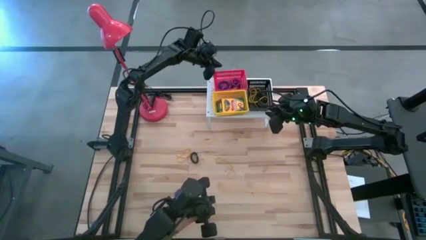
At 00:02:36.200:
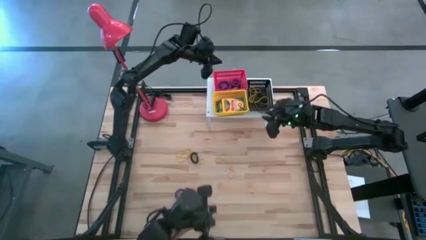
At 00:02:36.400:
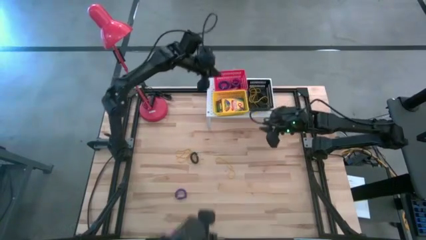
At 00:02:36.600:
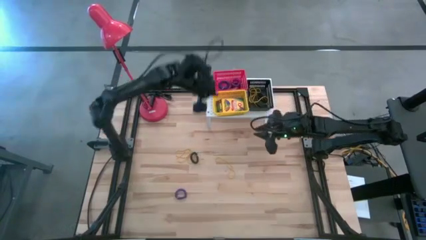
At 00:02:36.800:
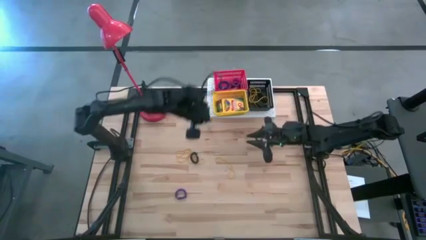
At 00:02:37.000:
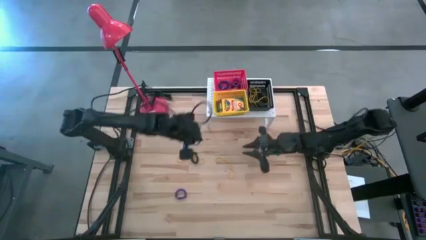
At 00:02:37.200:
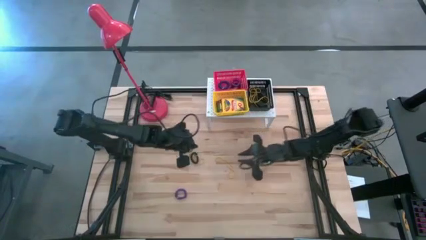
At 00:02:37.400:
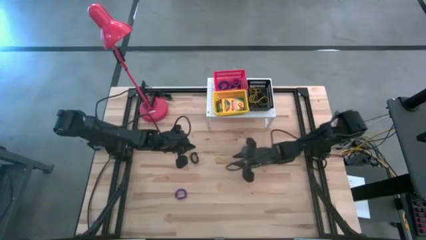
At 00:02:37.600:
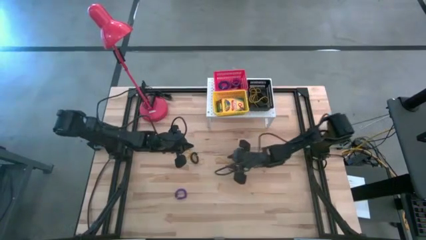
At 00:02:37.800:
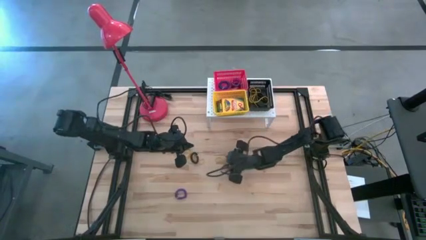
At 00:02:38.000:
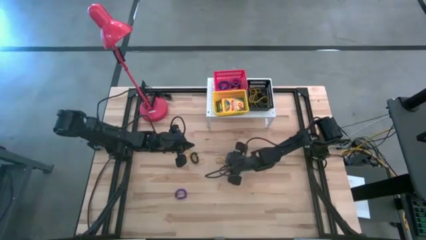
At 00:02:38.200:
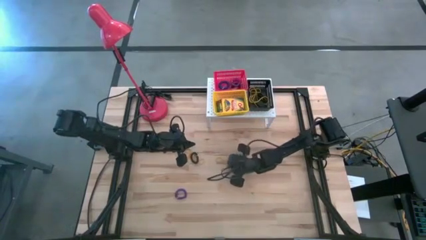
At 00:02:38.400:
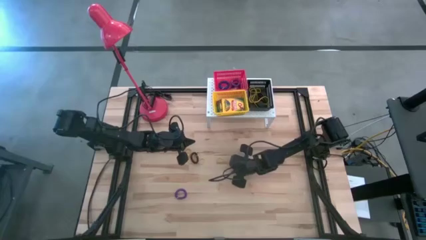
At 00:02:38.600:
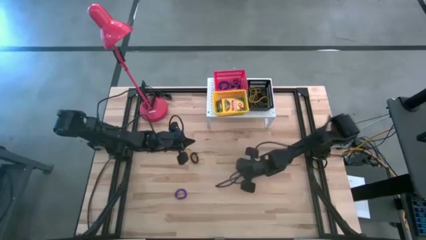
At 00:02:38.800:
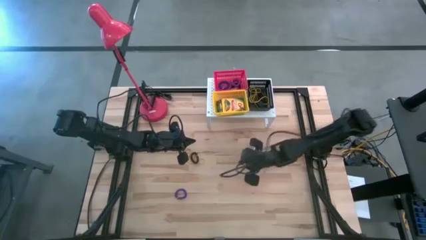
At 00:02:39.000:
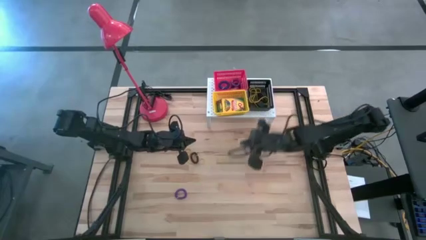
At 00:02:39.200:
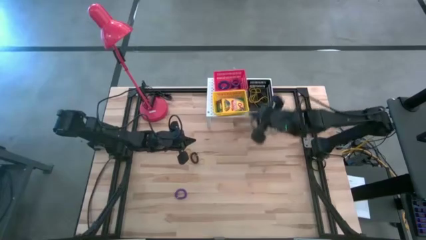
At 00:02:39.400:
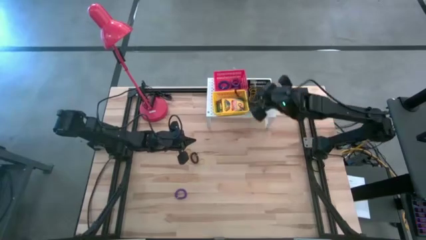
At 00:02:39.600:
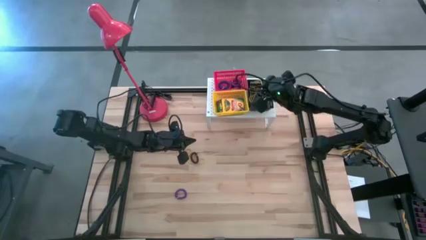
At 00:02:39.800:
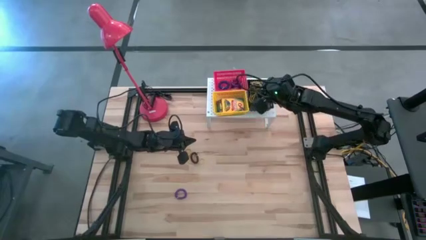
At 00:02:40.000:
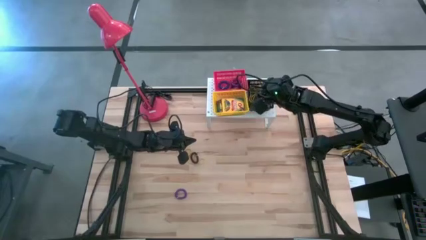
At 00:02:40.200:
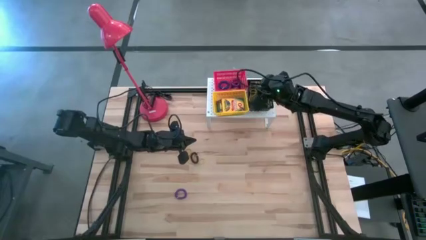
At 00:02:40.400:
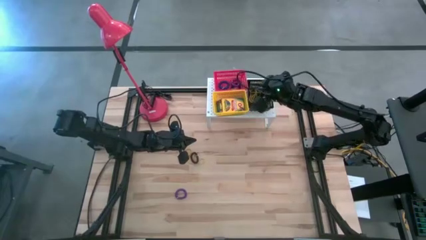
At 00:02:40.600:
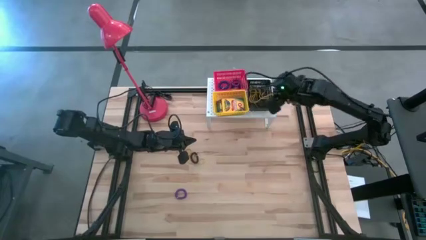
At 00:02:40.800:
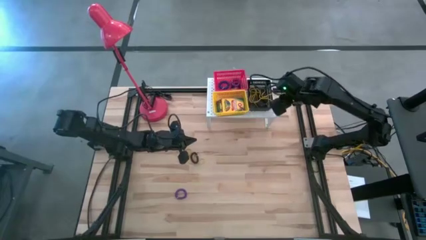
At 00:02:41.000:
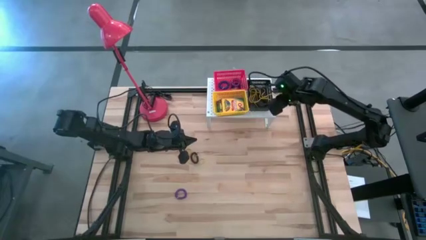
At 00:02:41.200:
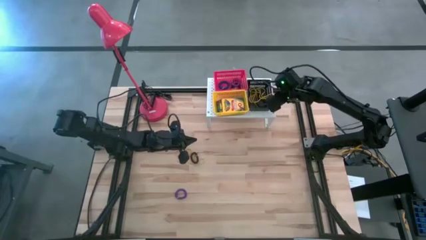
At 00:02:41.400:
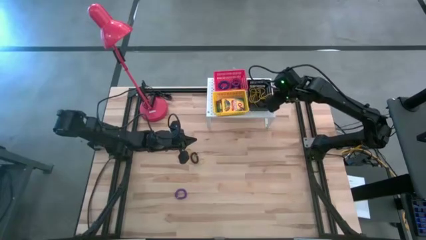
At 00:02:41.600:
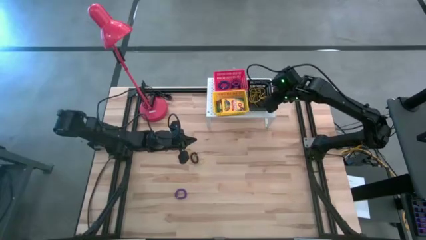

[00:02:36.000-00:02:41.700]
Task: Pick & Place Office Desk Supplies
Put the yellow rubber band into the black bin on the shelf

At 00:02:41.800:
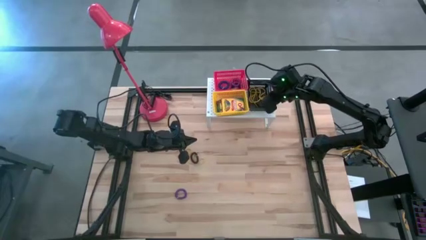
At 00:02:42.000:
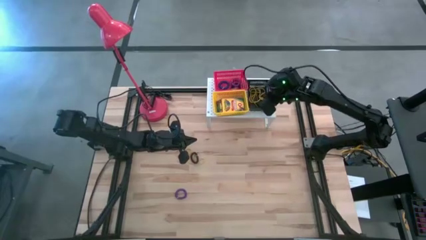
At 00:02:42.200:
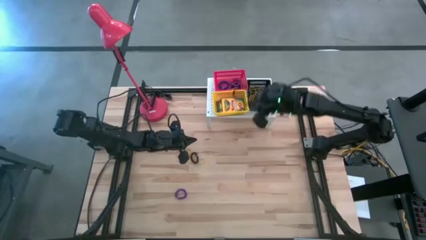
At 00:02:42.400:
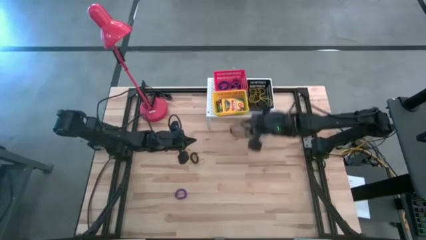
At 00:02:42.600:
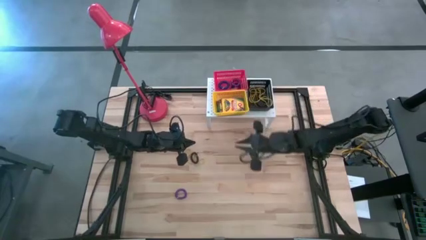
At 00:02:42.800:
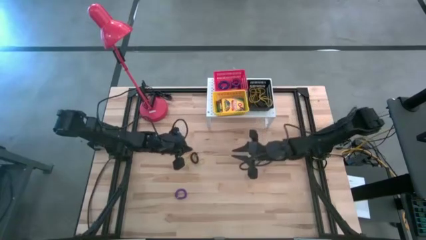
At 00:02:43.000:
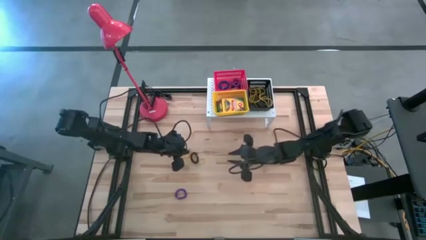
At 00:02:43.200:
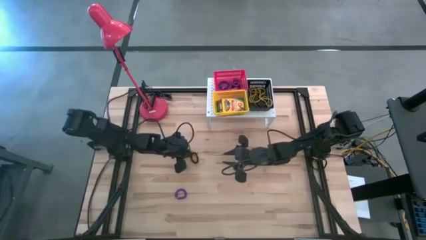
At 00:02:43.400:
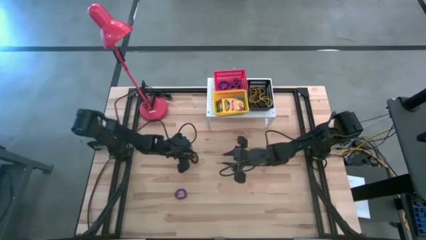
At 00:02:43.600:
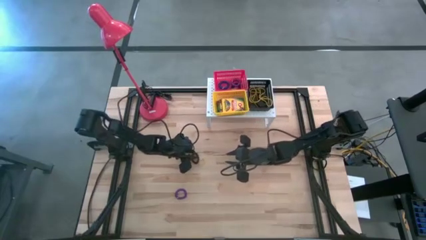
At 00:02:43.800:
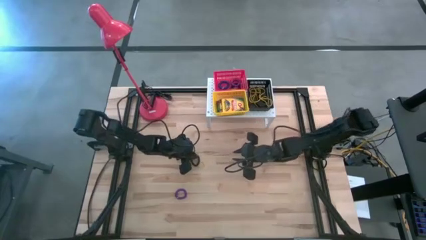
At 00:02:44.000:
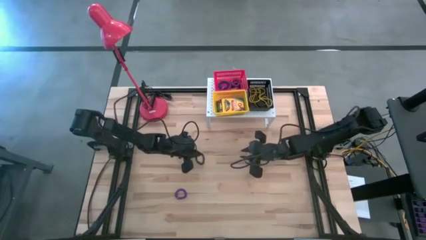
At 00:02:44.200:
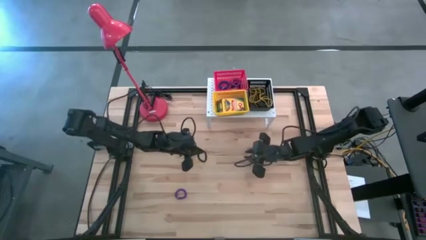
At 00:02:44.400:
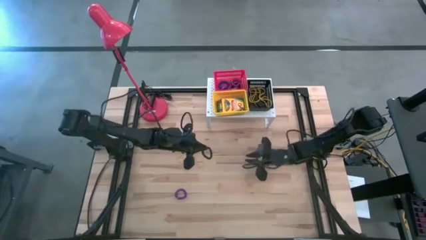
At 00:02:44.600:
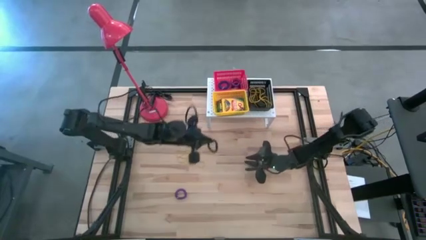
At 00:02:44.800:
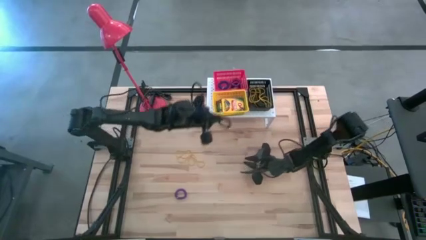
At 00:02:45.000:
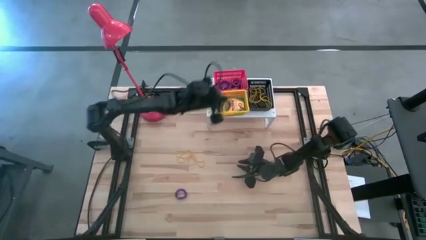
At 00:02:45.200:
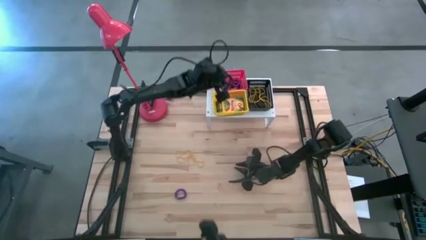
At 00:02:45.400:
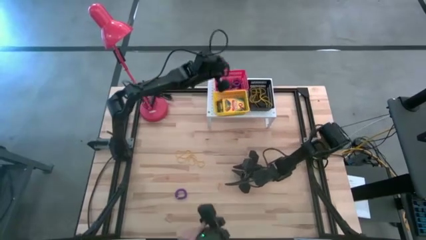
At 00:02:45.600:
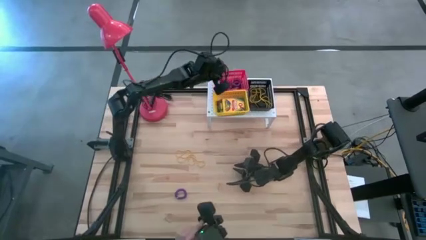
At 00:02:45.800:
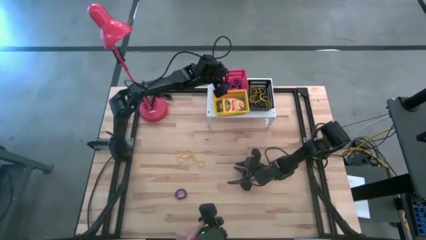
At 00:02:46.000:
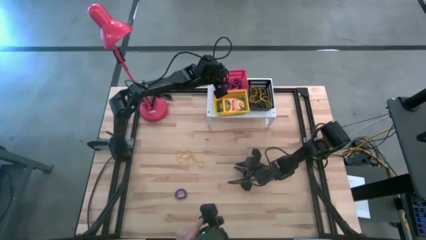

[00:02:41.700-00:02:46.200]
Put the black spring keychain into the red bin on the shelf

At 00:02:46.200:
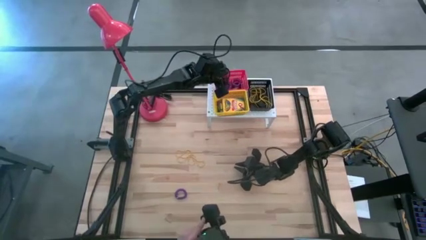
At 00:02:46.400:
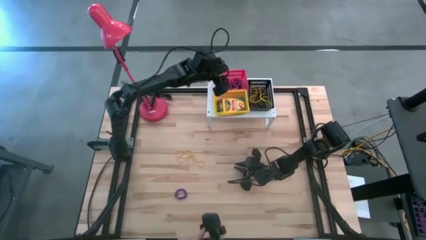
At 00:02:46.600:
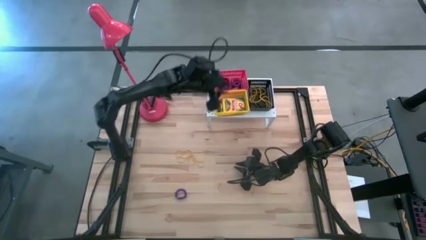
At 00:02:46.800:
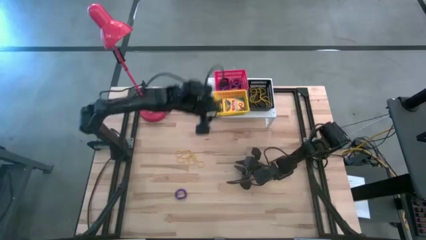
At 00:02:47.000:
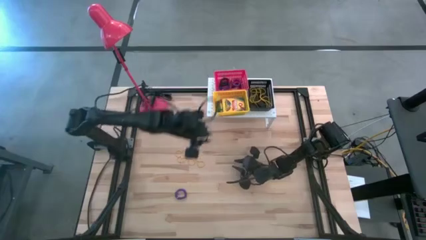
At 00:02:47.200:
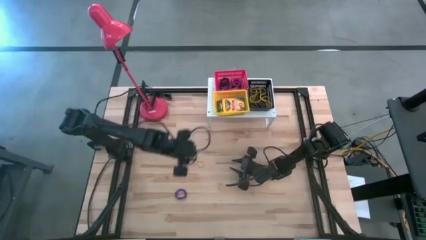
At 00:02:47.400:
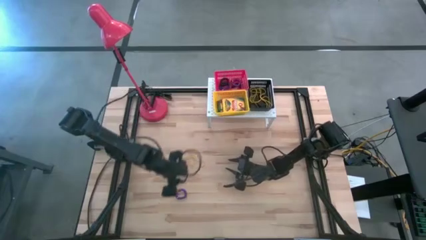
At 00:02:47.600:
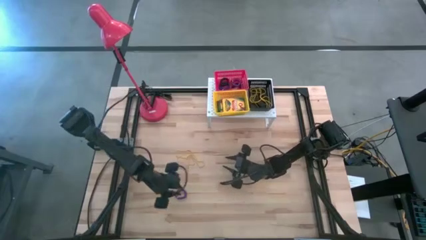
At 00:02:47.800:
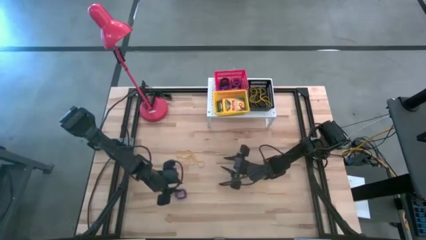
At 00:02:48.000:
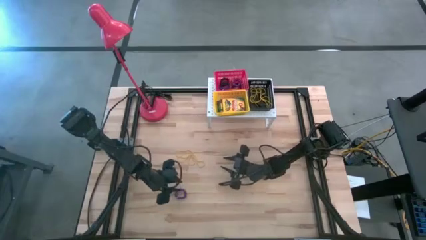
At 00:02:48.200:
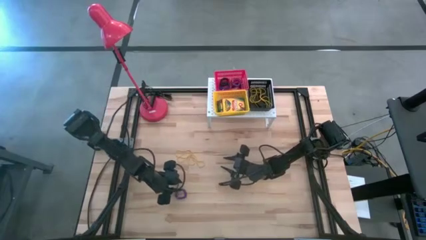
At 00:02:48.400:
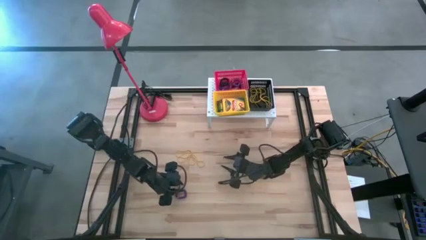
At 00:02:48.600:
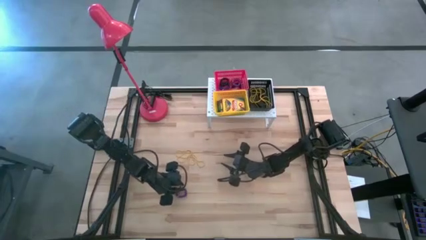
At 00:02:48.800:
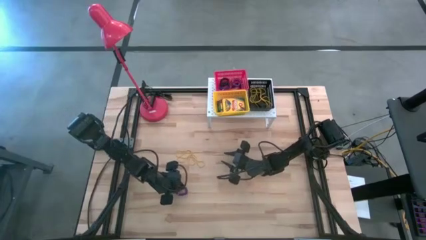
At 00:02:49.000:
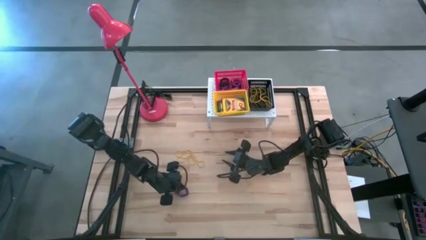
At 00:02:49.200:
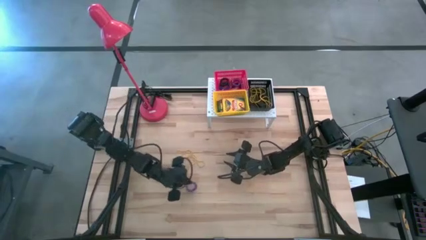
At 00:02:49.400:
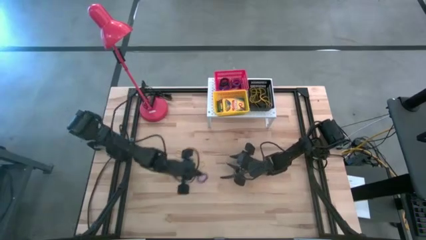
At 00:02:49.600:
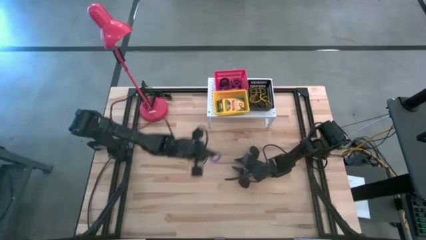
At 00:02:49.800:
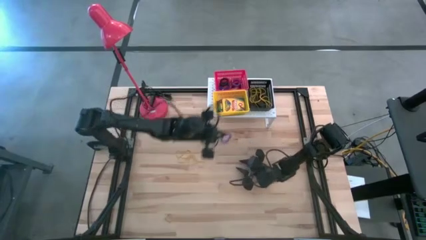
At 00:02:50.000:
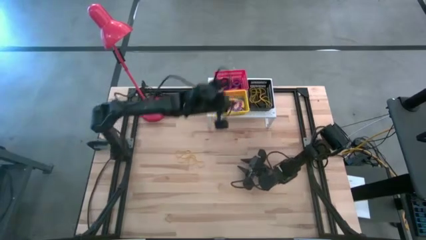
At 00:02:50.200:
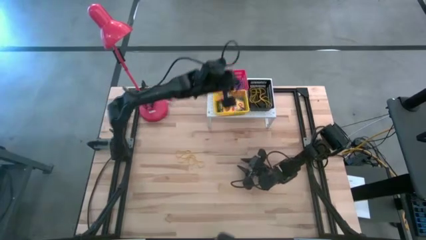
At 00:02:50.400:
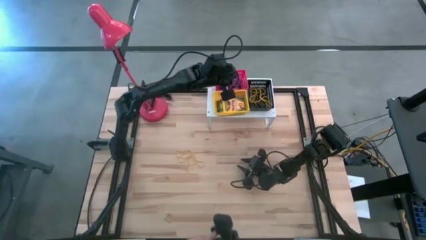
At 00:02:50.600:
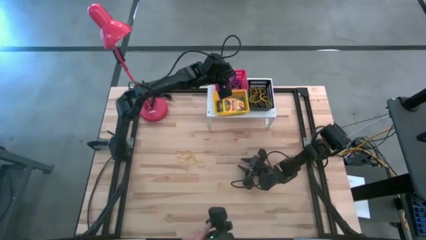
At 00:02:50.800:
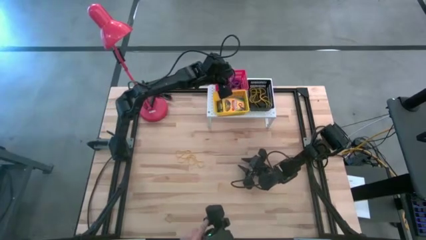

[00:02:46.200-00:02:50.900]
Put the violet spring keychain into the red bin on the shelf

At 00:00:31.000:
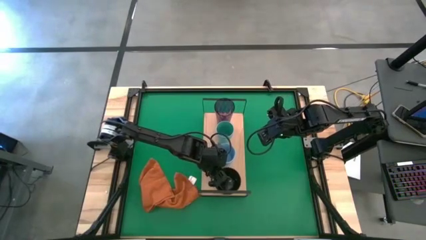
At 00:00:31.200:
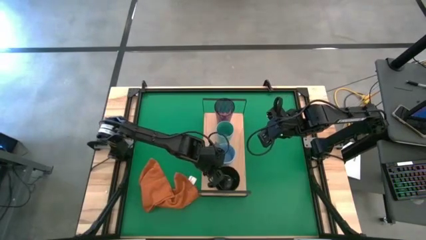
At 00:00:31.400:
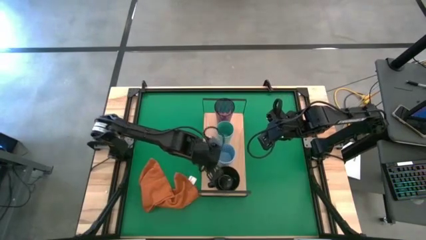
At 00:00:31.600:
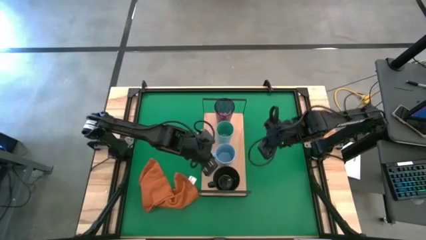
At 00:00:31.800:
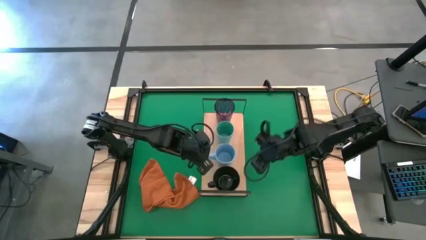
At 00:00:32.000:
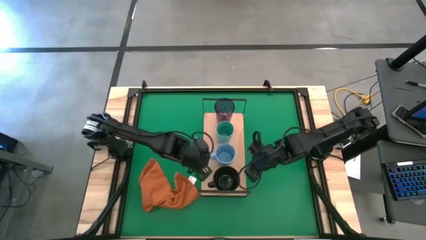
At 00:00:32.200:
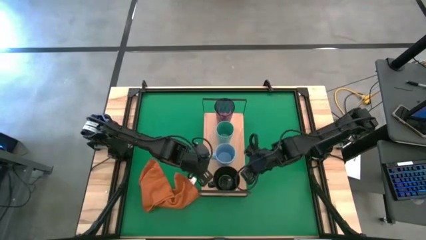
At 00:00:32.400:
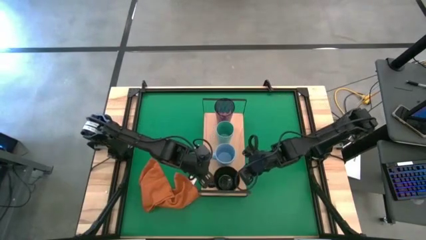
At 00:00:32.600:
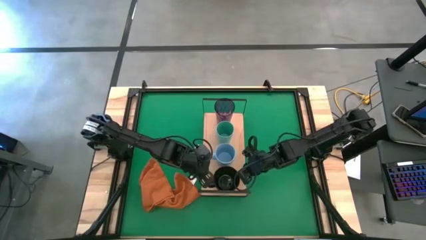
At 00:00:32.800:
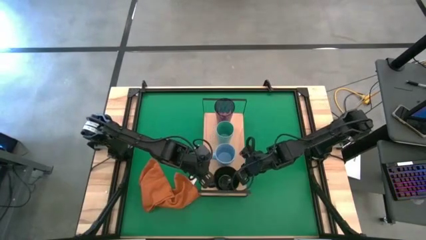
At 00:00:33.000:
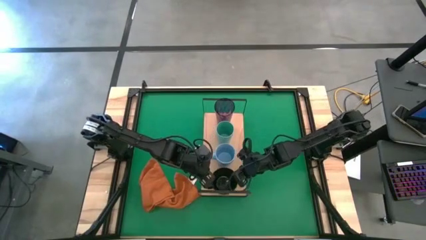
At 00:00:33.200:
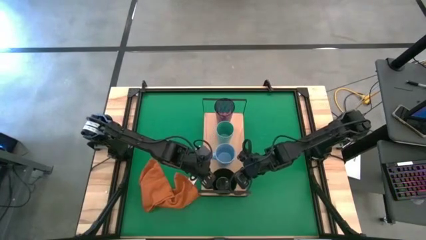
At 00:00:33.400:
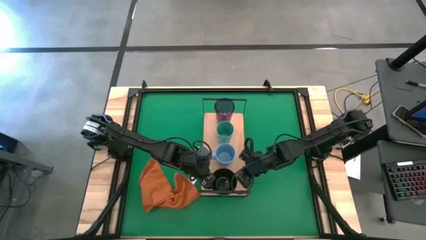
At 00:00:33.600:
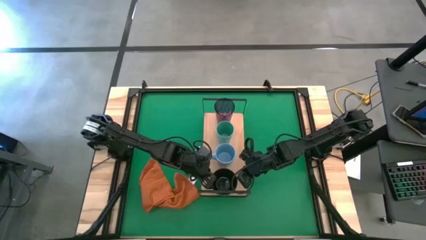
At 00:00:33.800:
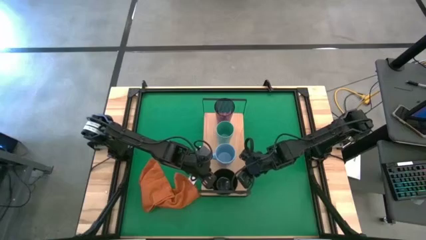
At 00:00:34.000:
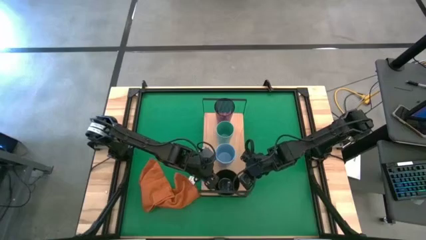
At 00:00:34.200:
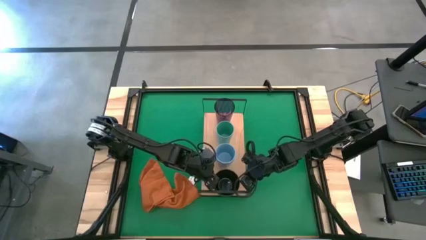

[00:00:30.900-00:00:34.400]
Task: Stack small to large cups/mugs on shelf
Adjust the black mug on the shelf
